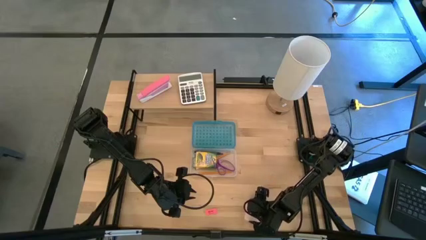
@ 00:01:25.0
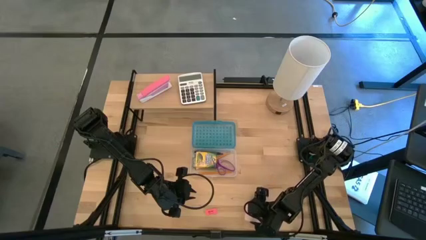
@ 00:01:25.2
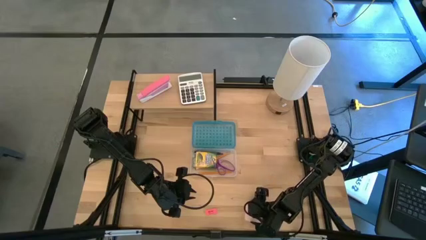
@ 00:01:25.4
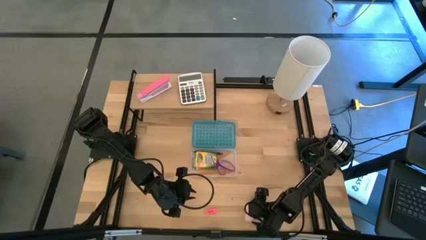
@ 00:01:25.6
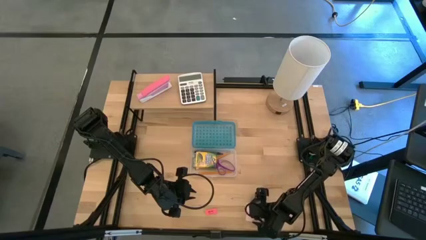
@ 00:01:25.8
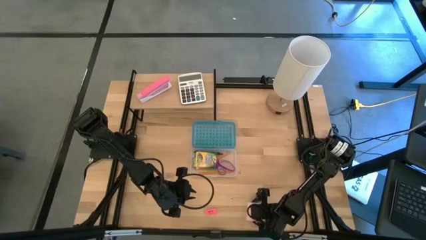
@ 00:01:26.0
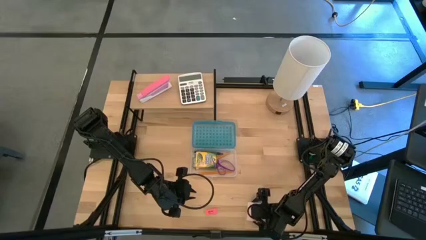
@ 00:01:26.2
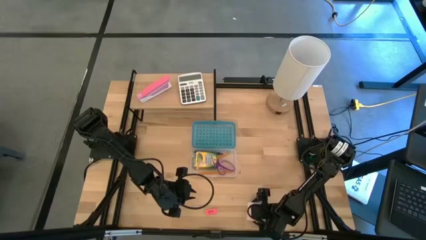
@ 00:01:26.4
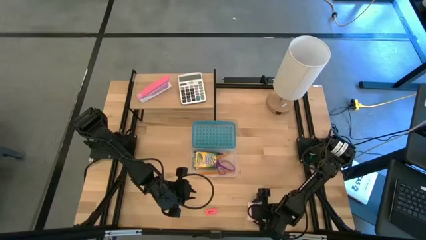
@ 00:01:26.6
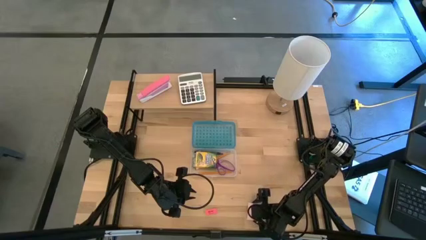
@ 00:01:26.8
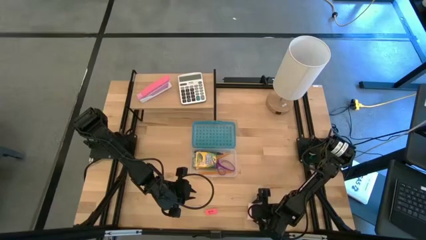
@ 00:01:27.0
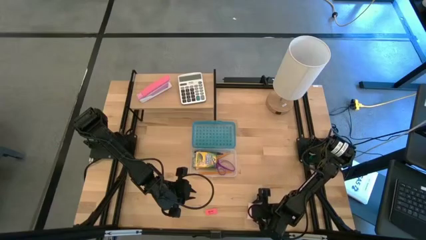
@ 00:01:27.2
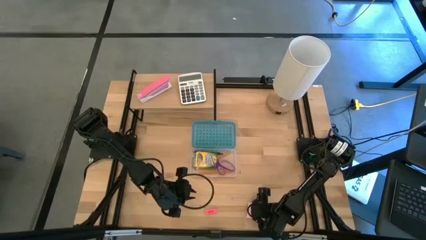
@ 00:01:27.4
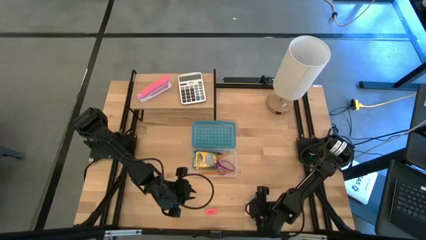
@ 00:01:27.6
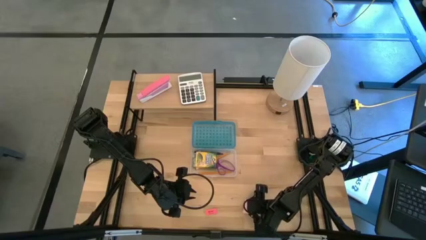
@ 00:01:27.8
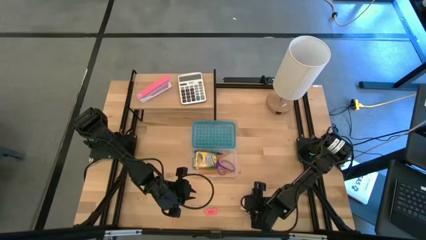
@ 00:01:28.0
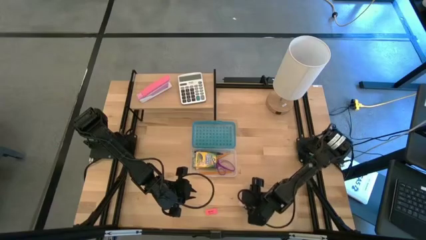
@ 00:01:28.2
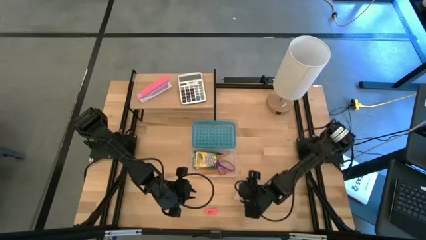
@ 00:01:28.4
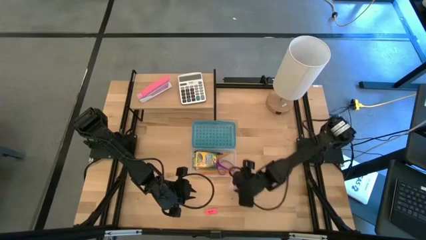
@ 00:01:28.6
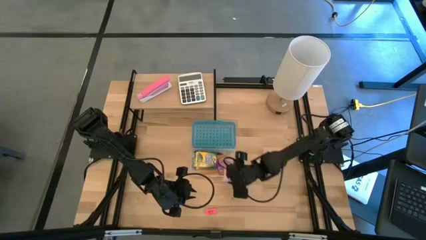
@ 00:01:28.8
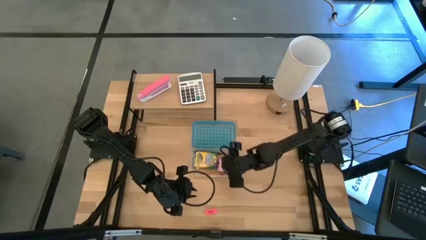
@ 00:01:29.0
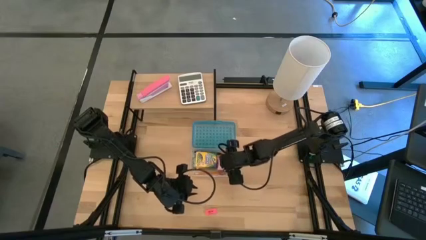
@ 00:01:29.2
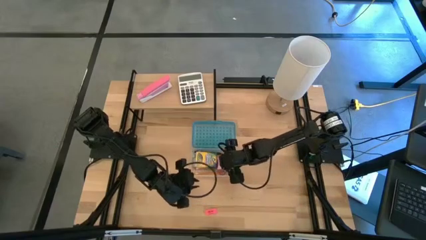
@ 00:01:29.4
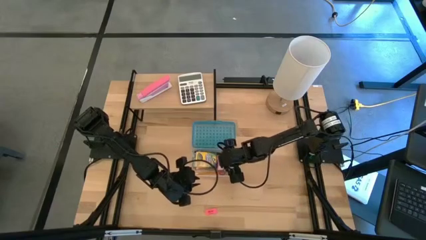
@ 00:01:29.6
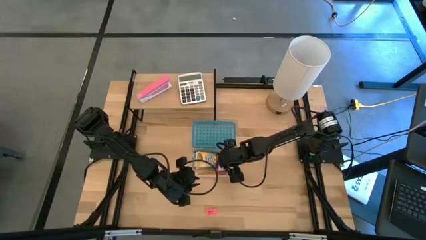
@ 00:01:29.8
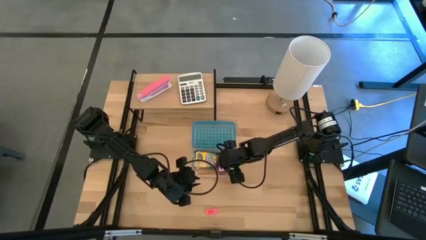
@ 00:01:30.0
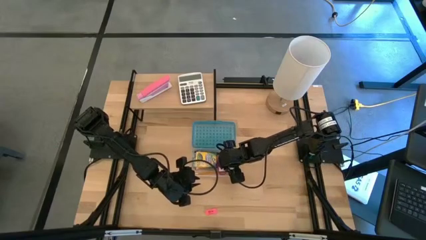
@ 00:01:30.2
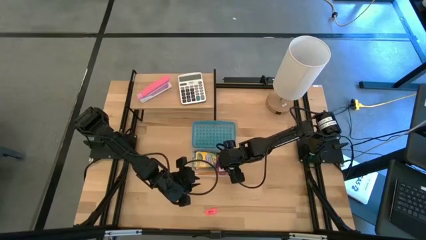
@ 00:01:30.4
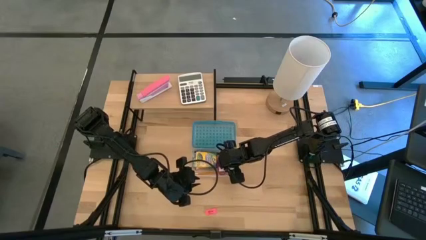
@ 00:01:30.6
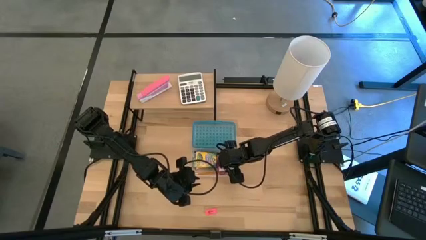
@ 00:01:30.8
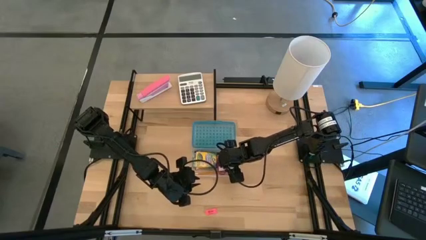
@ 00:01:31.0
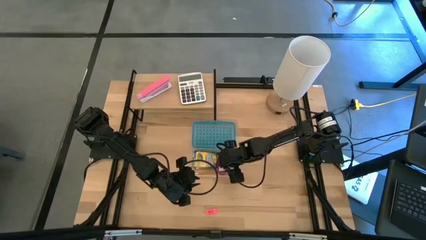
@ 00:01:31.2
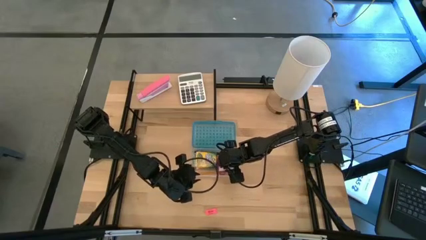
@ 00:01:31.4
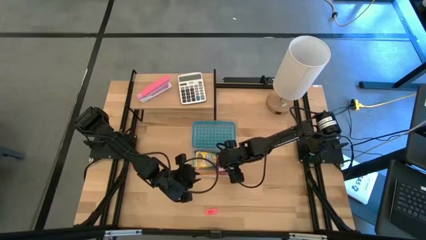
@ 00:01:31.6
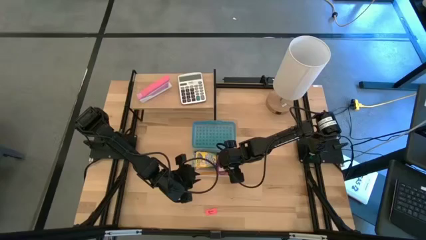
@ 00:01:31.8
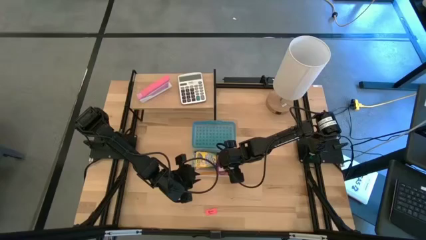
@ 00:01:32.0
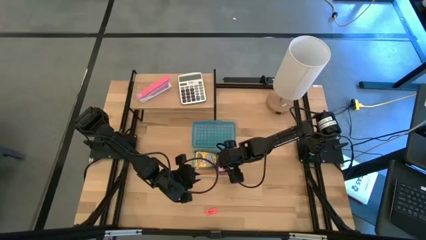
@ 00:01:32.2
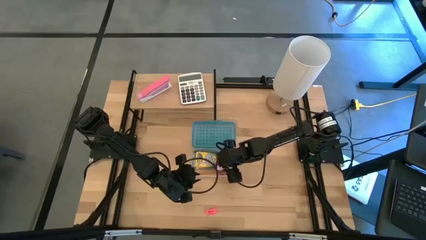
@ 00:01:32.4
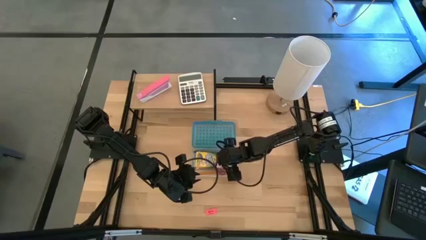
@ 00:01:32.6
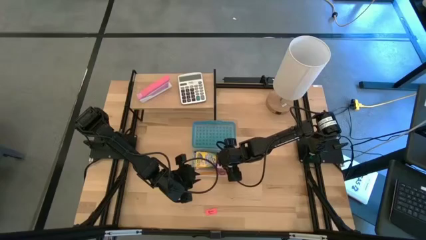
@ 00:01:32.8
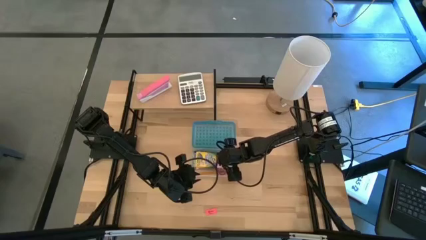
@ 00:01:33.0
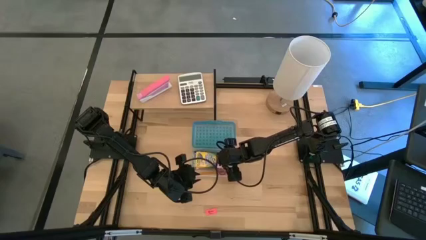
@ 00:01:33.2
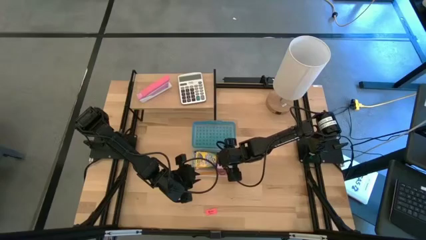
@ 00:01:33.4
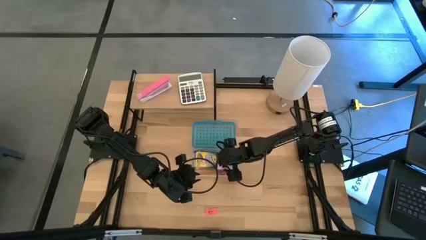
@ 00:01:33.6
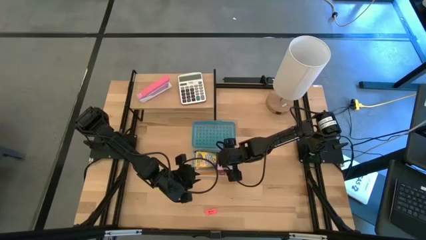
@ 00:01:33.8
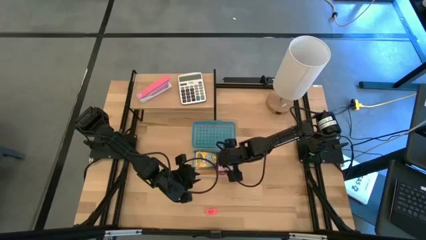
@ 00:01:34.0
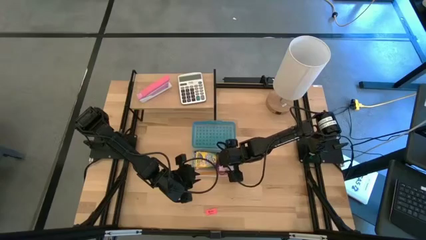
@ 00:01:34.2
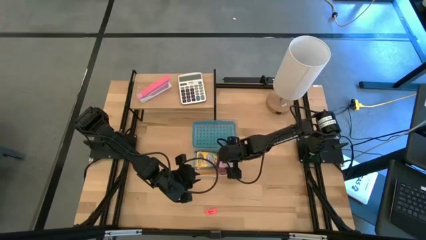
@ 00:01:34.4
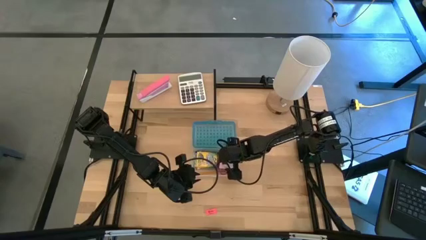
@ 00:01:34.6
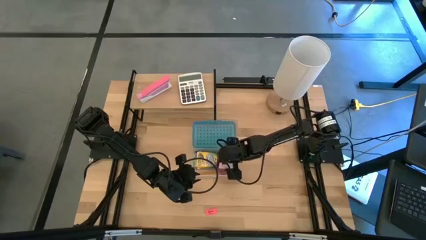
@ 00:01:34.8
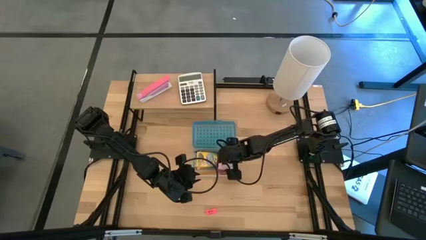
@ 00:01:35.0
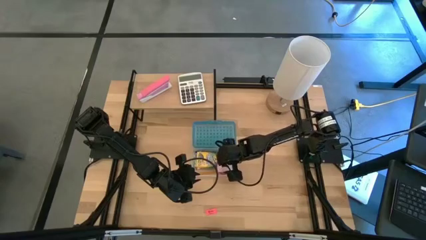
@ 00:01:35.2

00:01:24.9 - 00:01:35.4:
Task: Pack school essentials
Put the pink sticky notes into the blue supply box

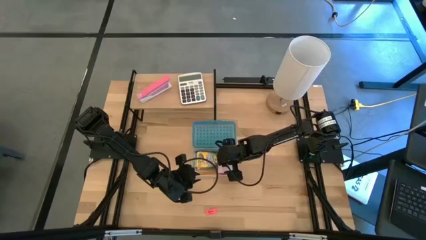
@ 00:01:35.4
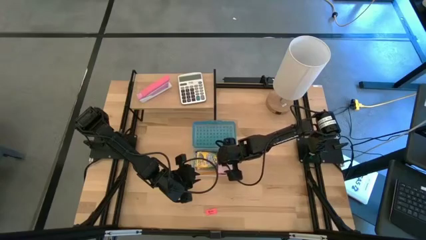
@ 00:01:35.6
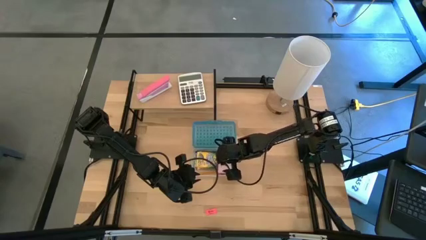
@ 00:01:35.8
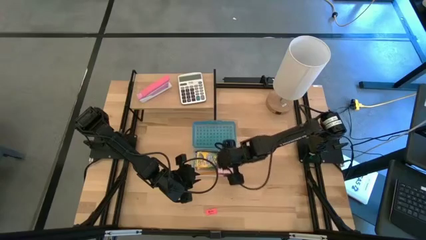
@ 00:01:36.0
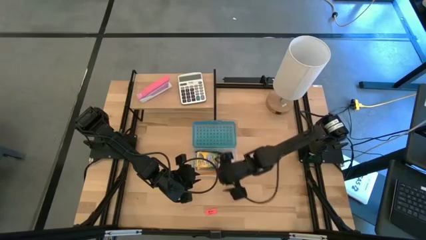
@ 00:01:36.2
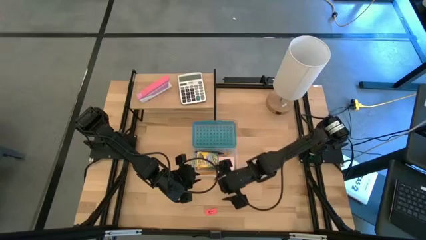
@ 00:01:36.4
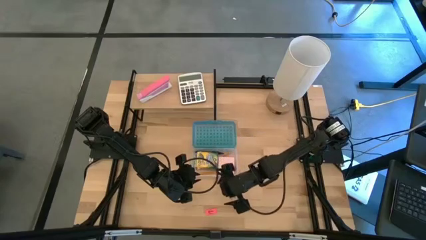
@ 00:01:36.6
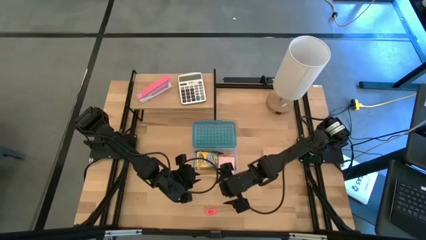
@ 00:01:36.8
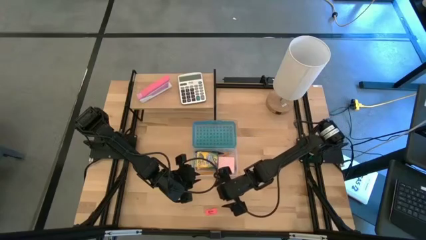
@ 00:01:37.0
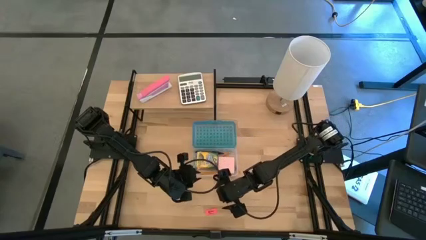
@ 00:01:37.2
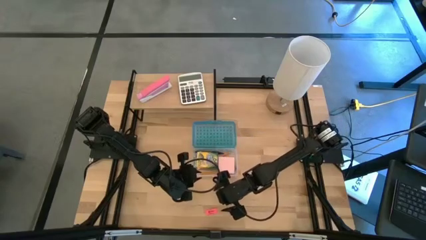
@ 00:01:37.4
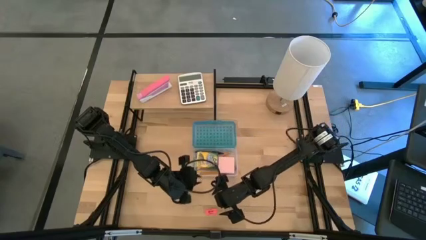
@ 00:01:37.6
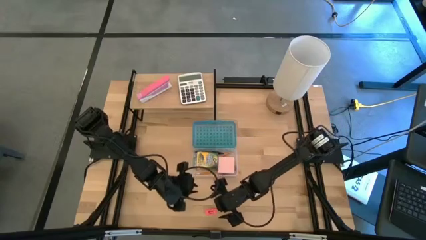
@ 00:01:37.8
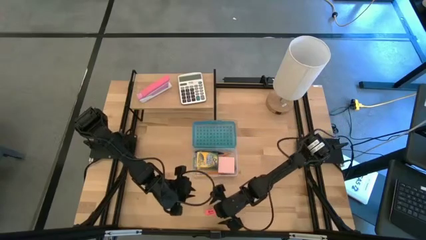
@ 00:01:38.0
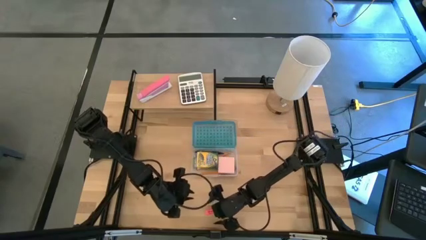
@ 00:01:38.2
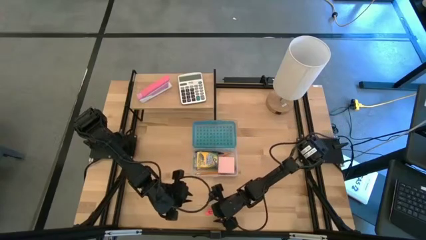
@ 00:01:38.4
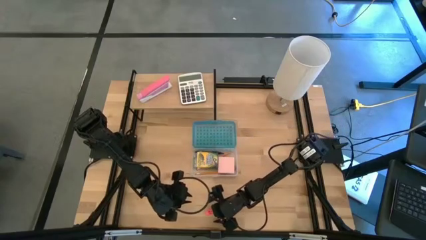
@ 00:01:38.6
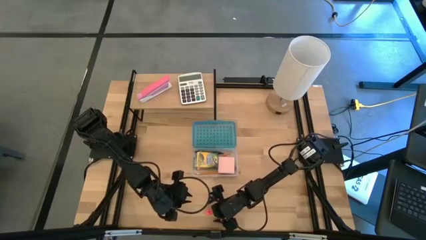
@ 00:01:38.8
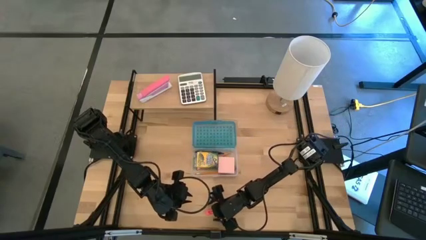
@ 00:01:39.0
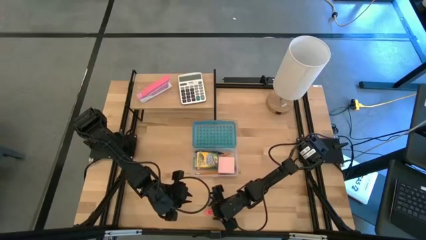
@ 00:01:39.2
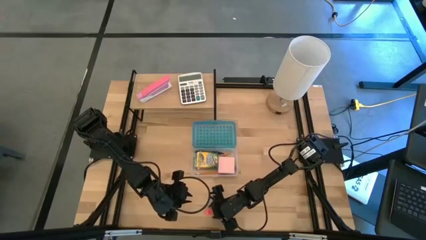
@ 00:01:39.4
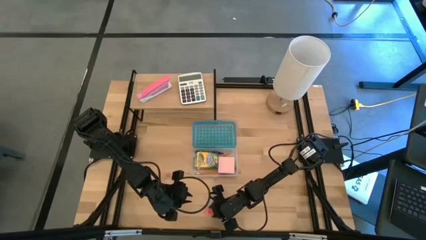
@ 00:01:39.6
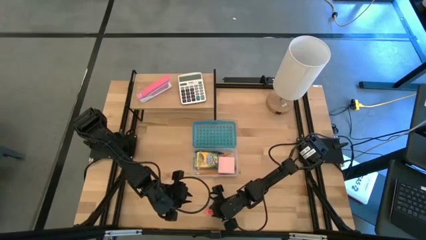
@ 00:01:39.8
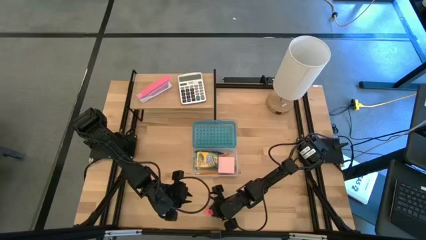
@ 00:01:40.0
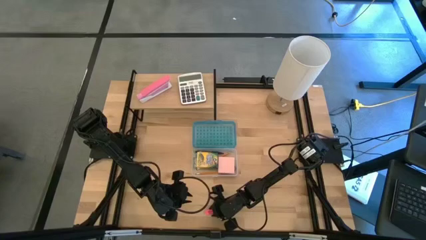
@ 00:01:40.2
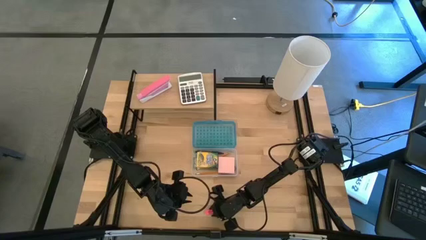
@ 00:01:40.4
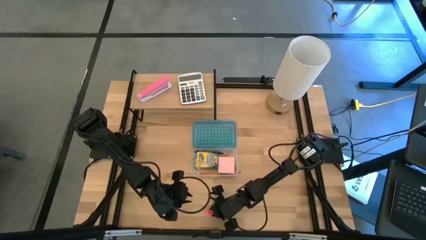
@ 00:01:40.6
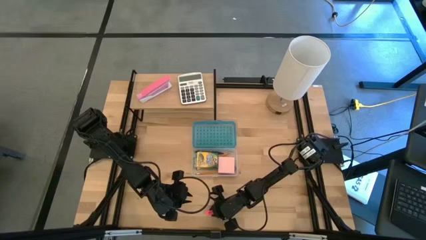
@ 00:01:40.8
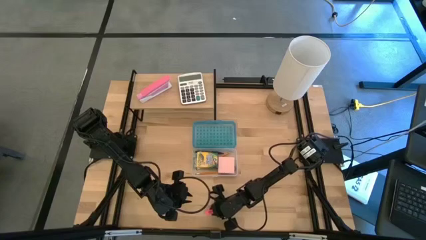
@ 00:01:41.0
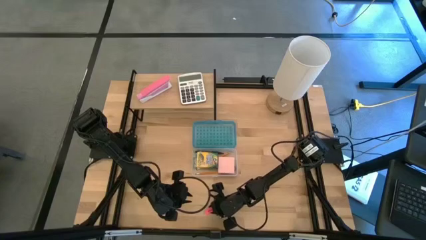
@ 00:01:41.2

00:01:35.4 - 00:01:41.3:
Put the pink eraser into the blue supply box

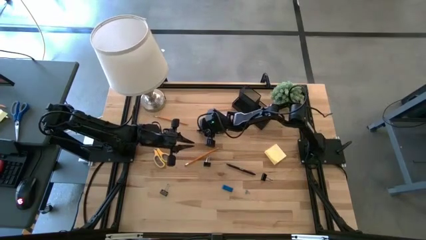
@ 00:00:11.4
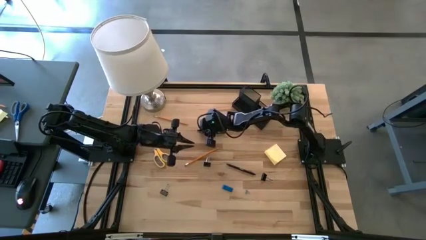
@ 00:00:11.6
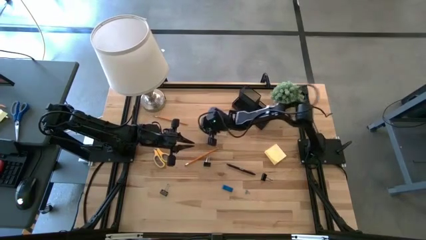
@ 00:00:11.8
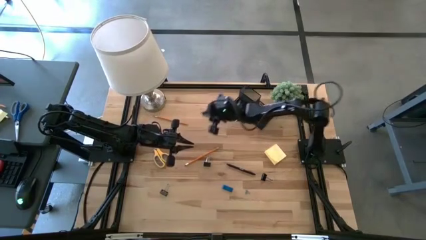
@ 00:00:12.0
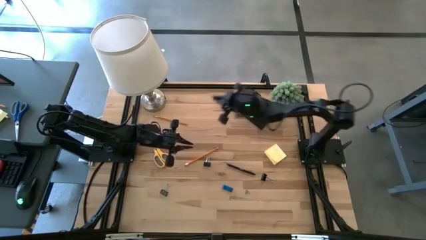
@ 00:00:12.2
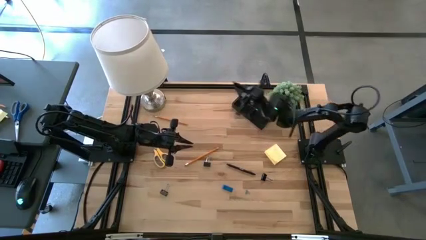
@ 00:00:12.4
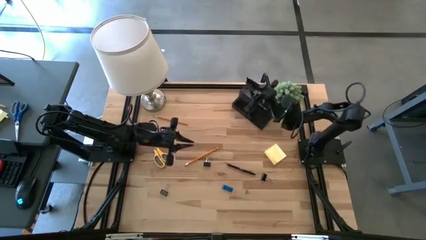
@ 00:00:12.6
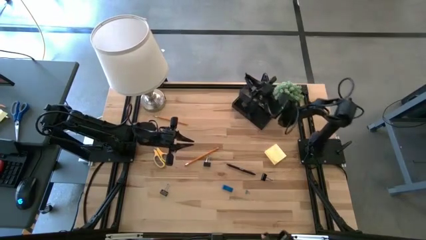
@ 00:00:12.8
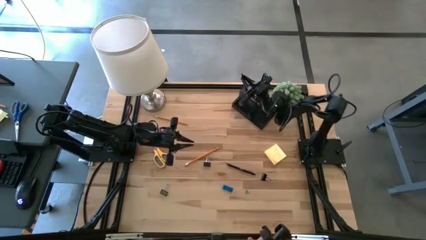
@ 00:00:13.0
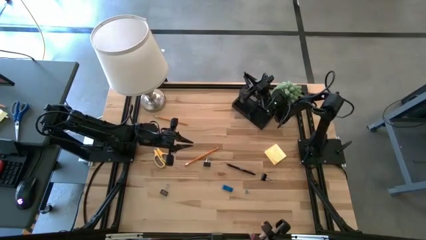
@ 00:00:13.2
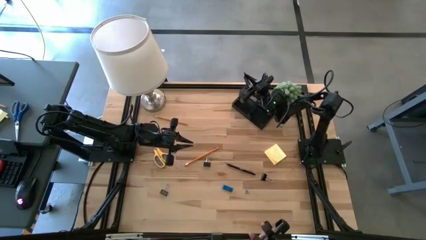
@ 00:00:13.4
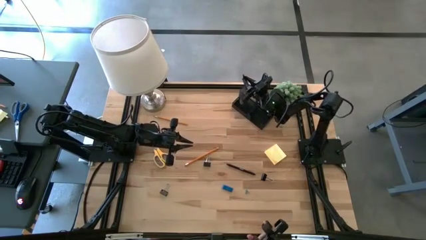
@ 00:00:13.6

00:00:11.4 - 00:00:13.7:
Task: Pick and place office supplies into organizer
Put the top black pen into the desk organizer
